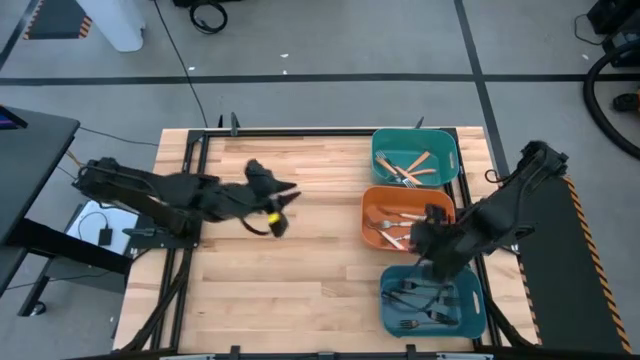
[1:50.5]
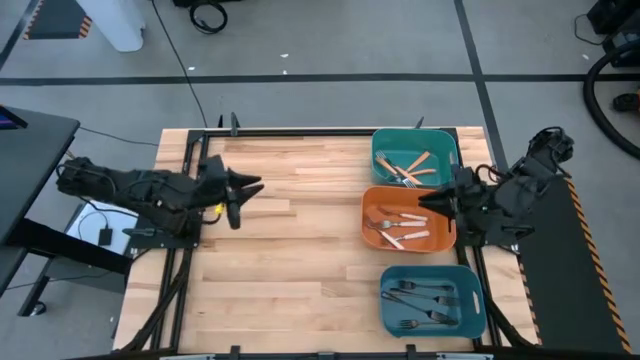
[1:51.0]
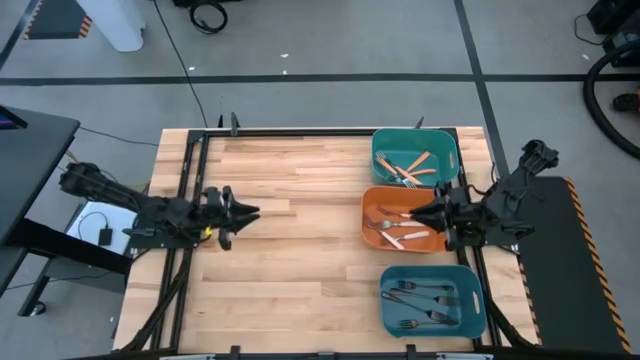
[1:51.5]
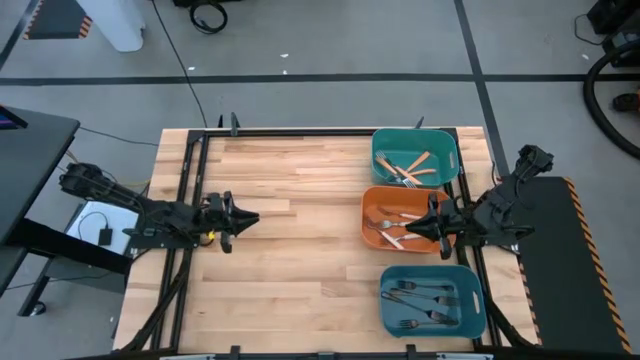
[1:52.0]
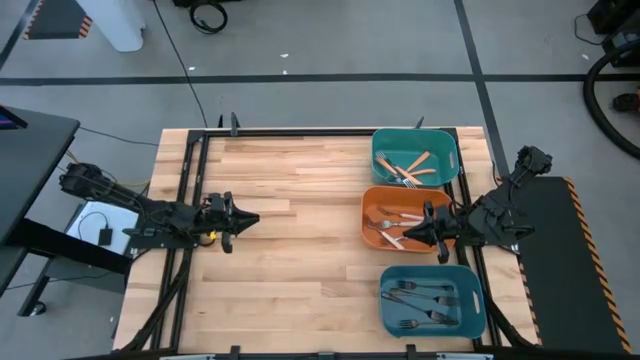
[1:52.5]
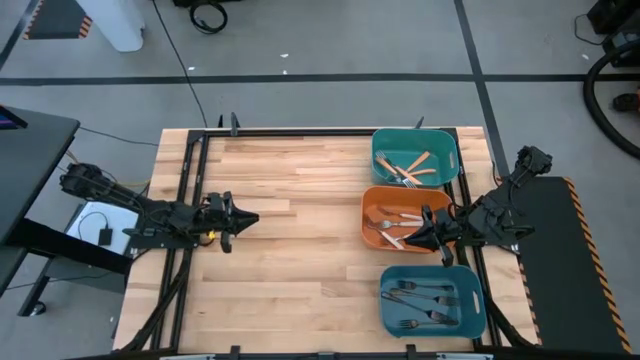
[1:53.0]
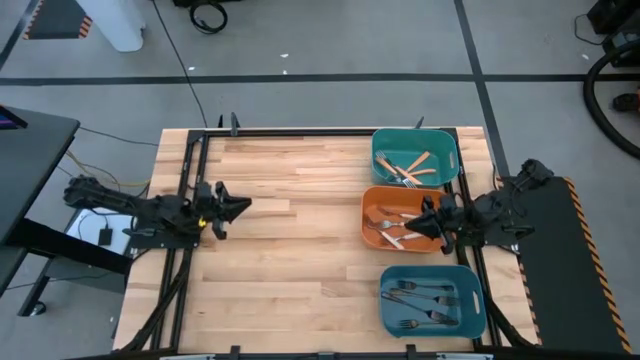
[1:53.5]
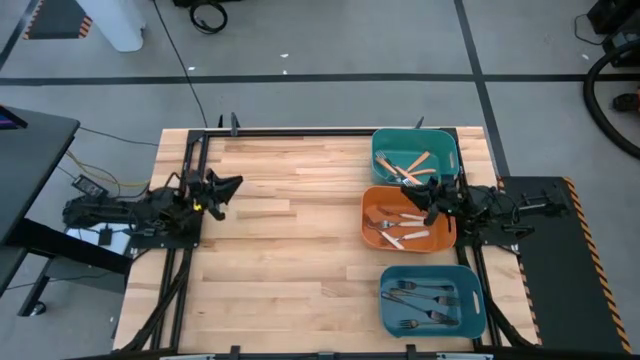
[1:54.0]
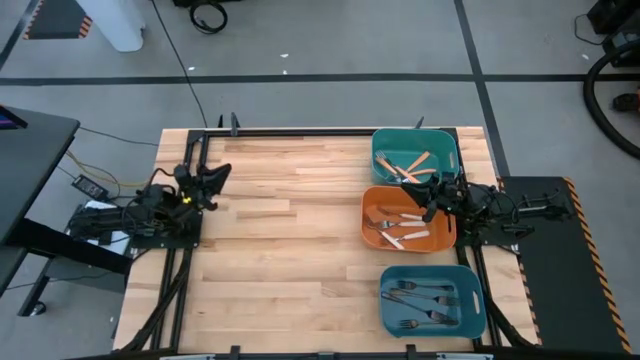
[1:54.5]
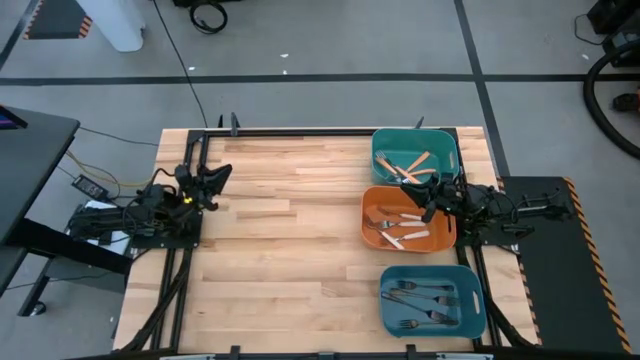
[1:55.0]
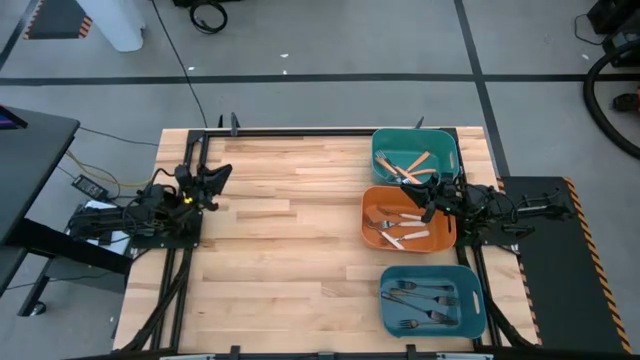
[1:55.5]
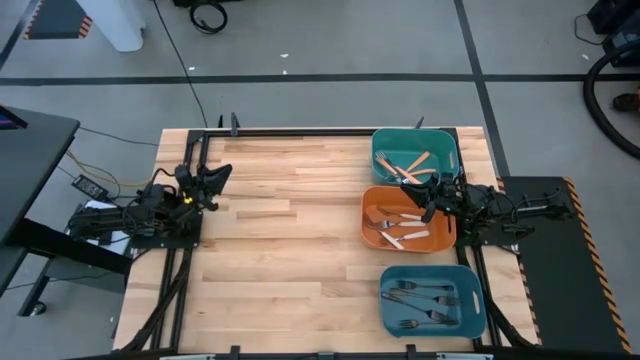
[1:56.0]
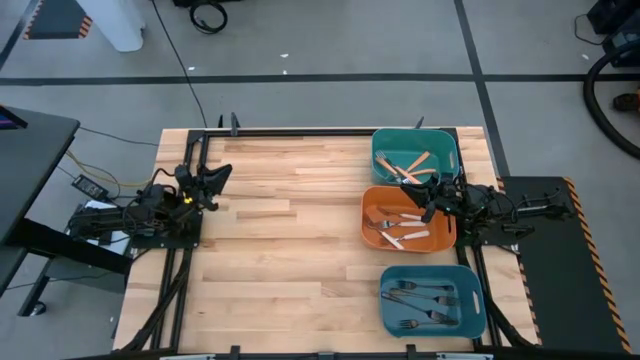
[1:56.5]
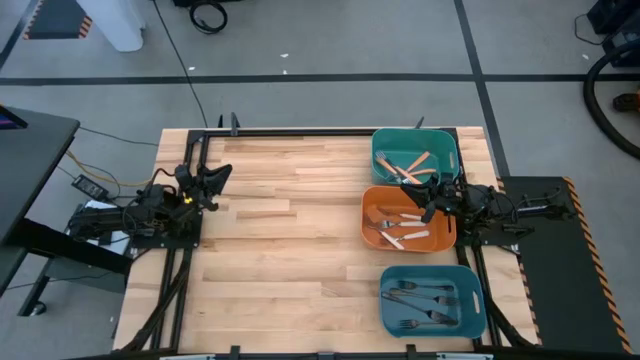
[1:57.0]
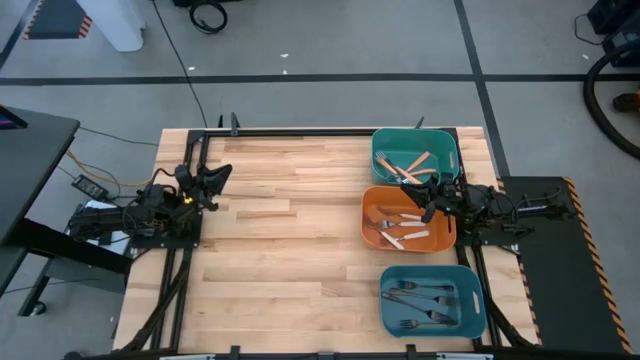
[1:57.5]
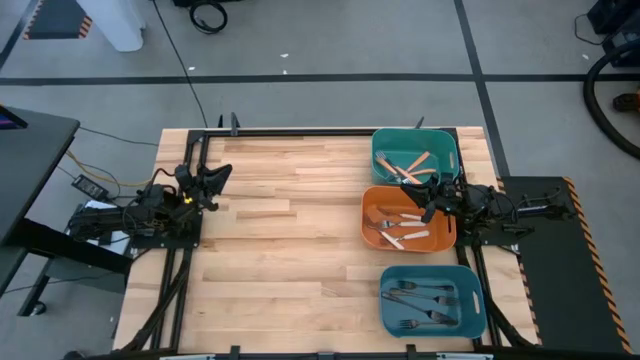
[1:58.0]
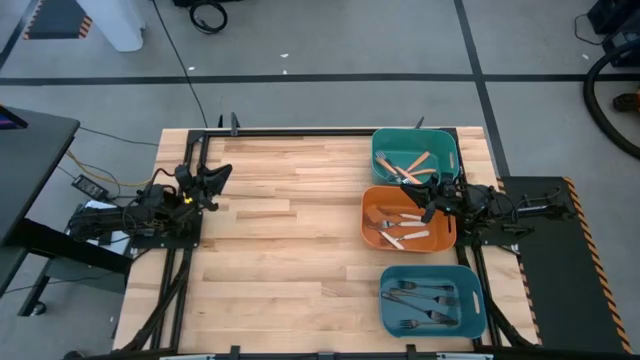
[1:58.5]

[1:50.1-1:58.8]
Task: Sort silverware by color (type)
Return to Home Position

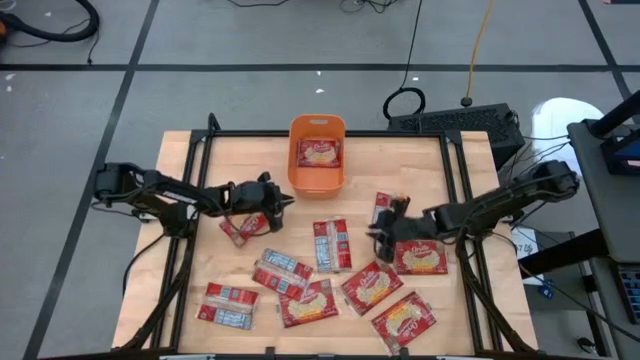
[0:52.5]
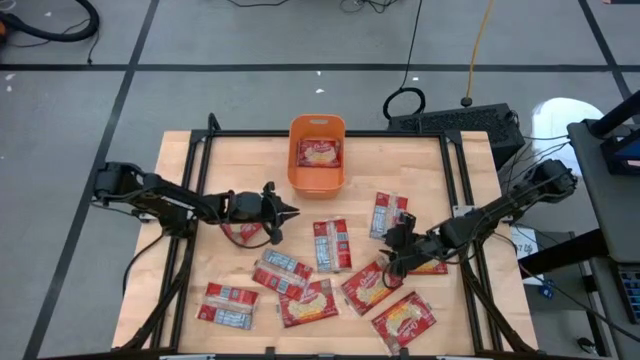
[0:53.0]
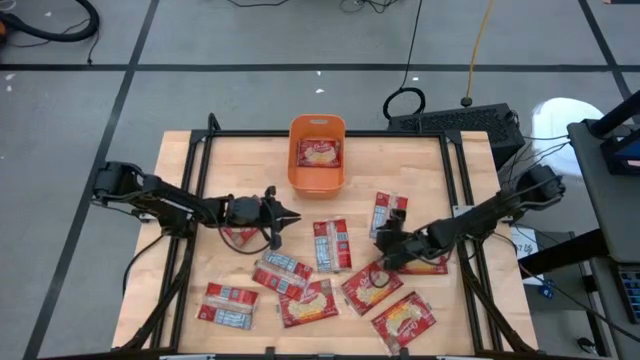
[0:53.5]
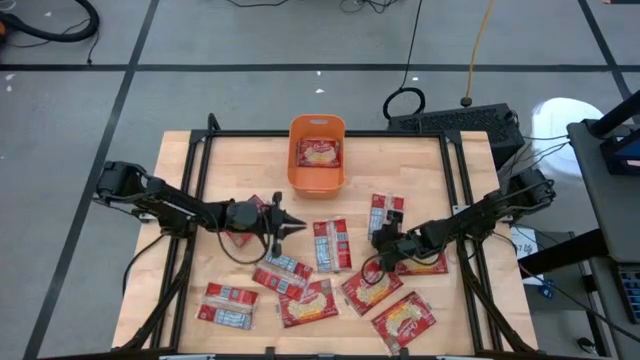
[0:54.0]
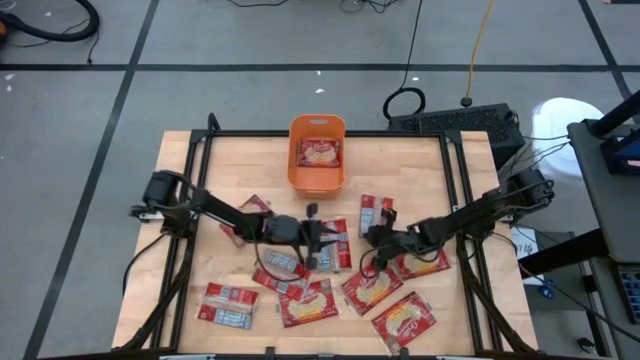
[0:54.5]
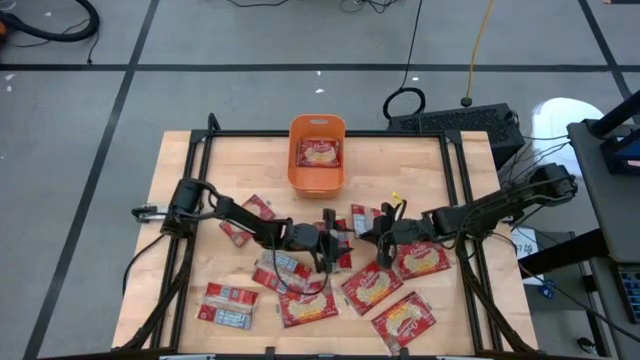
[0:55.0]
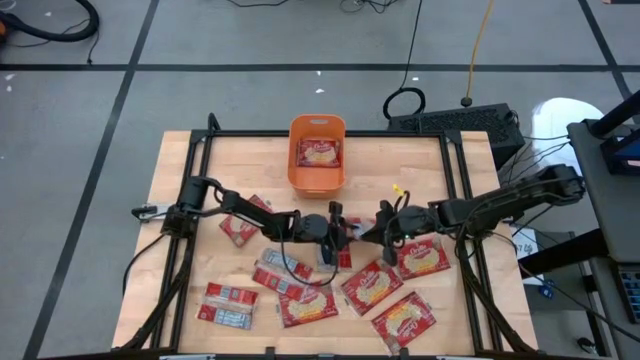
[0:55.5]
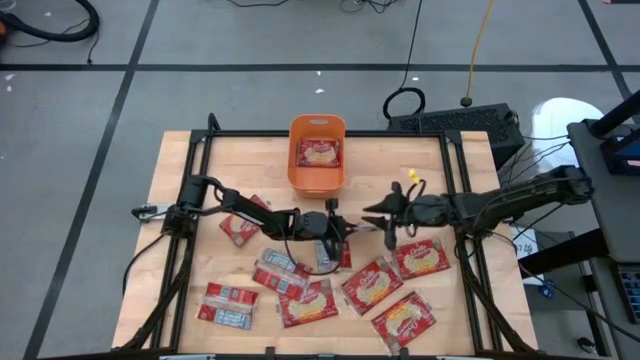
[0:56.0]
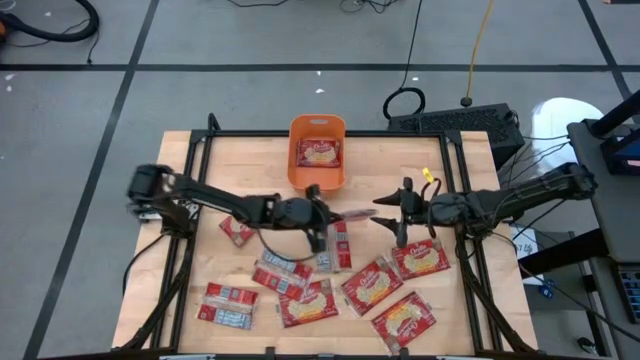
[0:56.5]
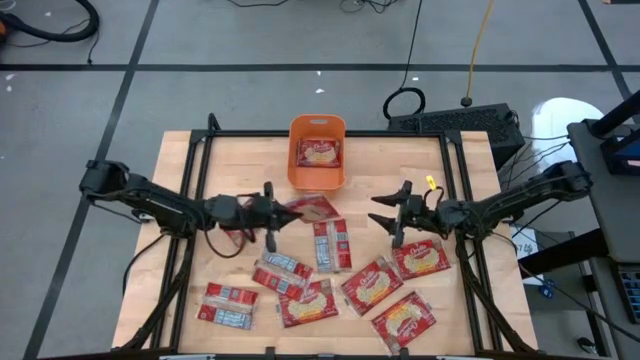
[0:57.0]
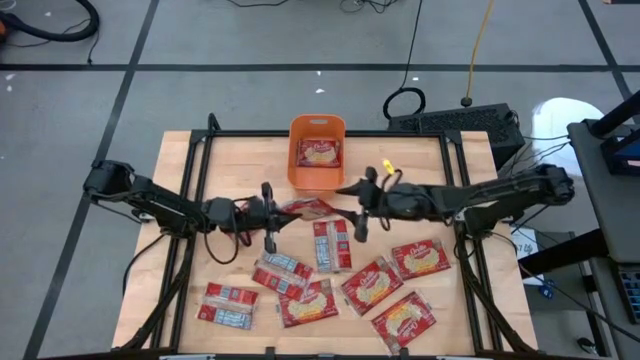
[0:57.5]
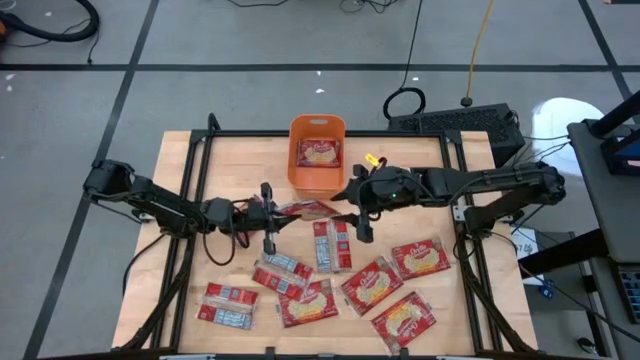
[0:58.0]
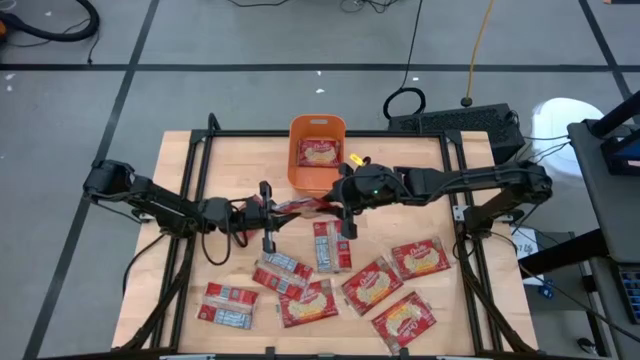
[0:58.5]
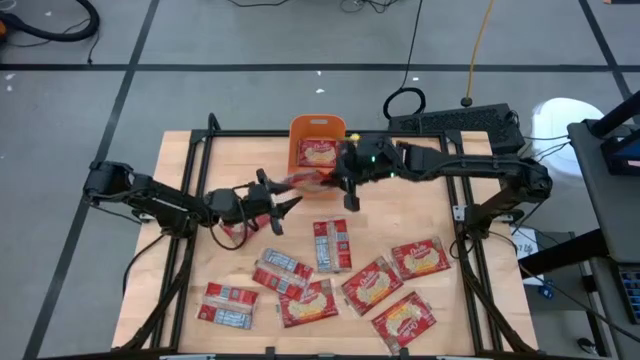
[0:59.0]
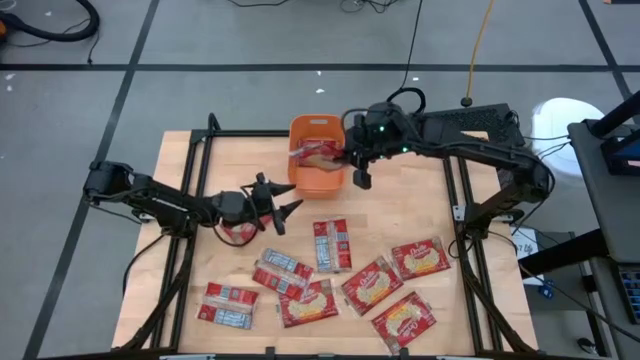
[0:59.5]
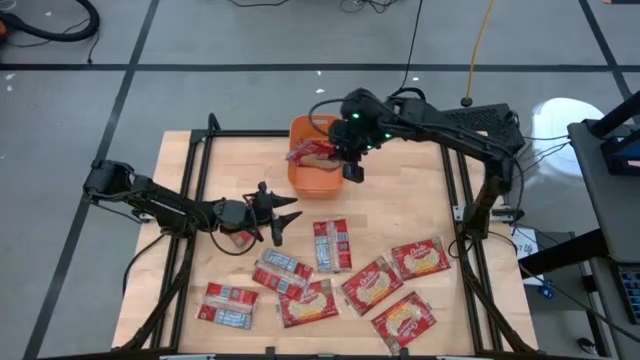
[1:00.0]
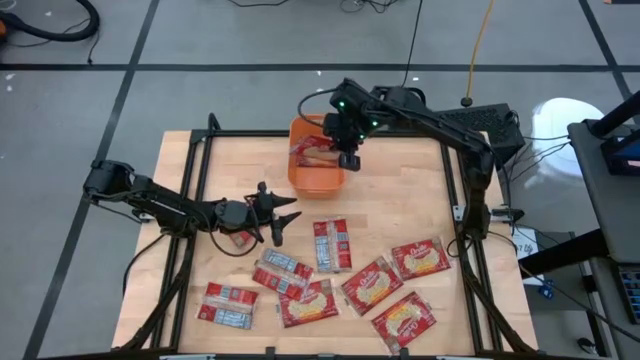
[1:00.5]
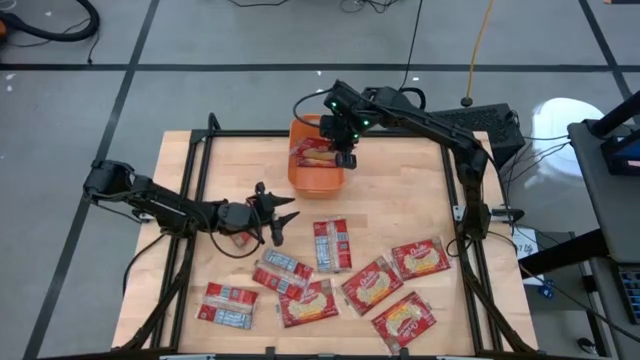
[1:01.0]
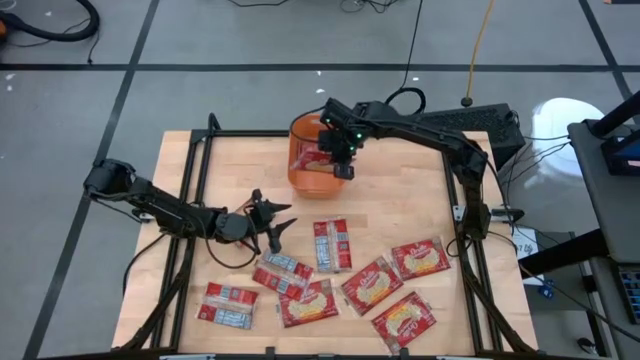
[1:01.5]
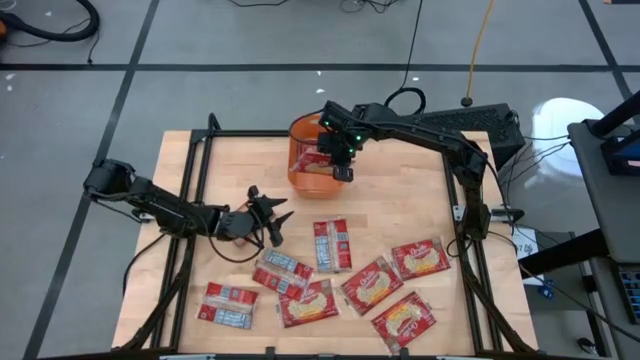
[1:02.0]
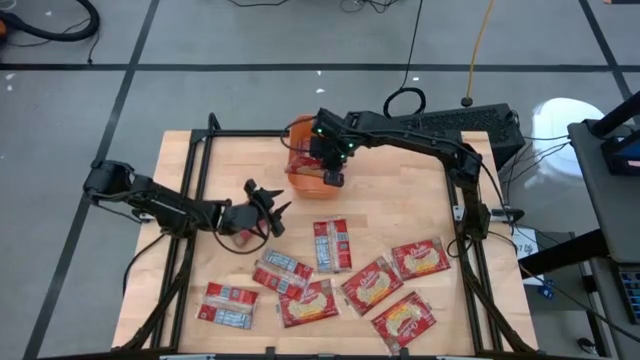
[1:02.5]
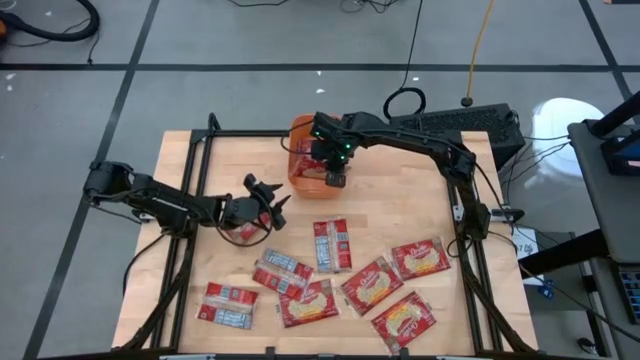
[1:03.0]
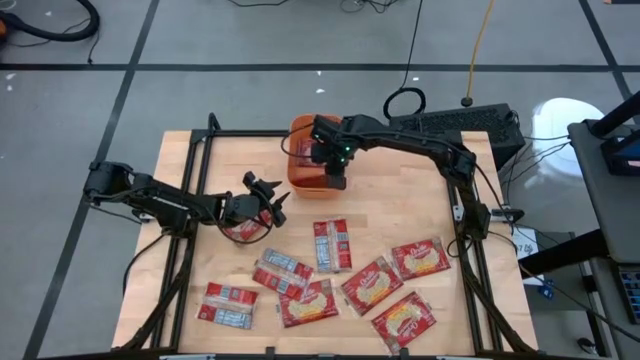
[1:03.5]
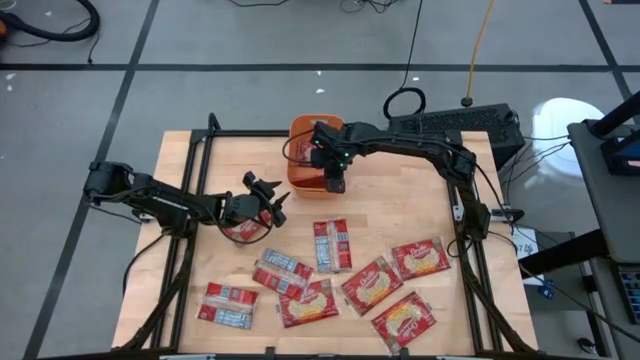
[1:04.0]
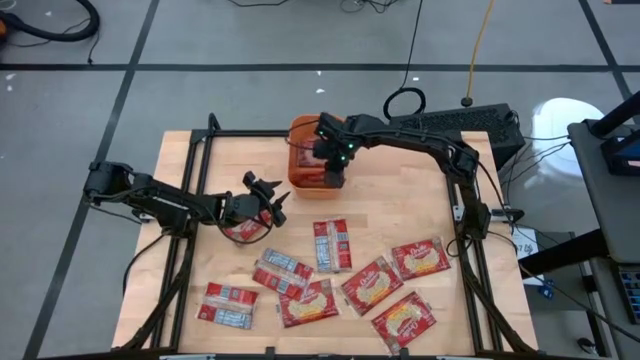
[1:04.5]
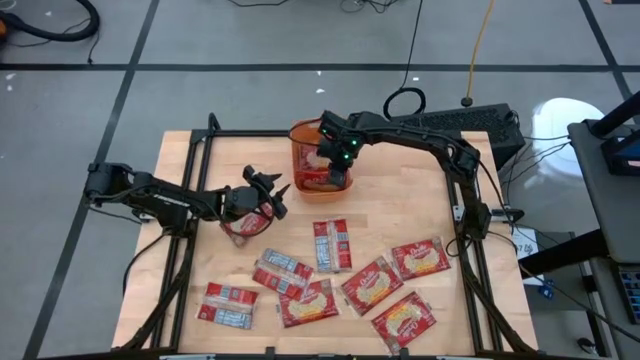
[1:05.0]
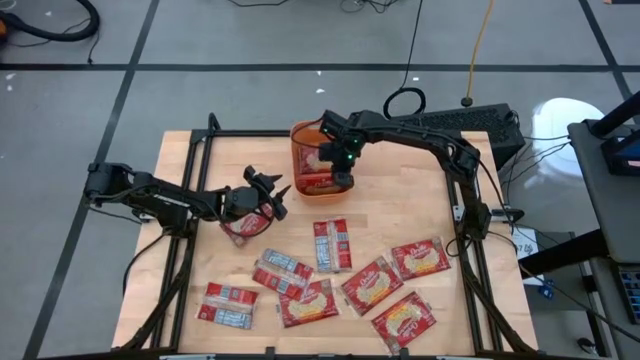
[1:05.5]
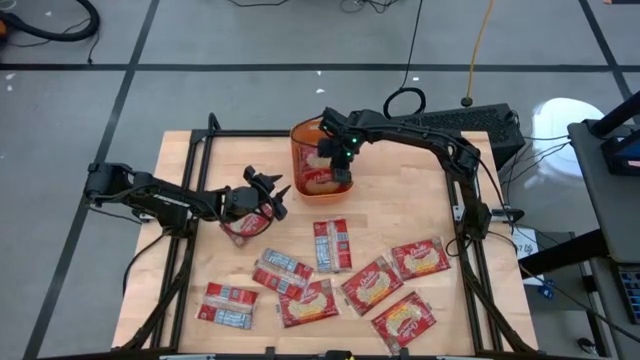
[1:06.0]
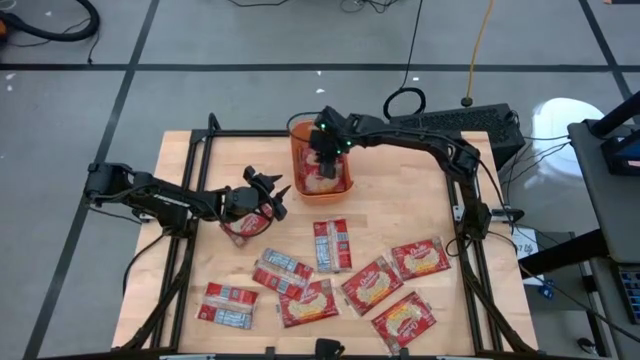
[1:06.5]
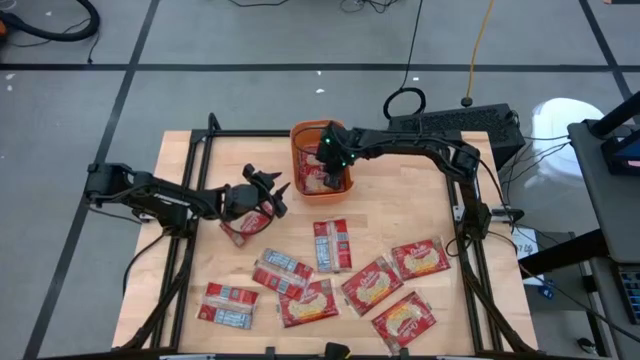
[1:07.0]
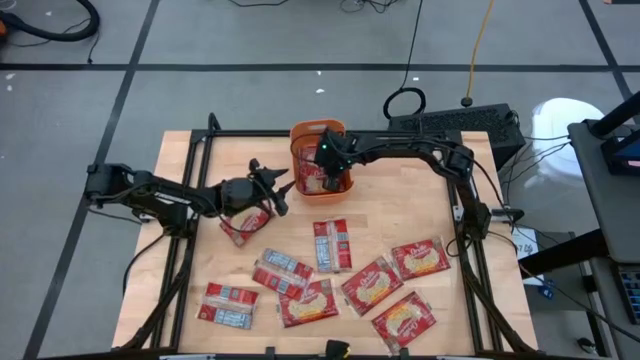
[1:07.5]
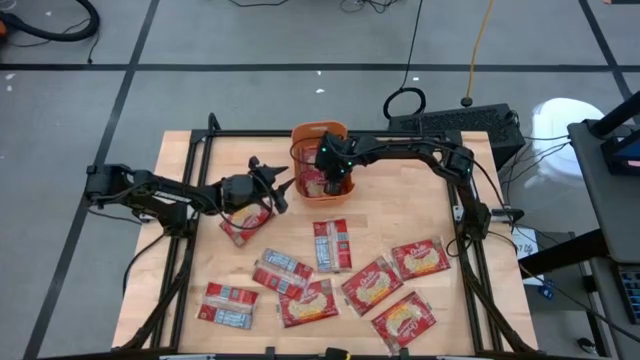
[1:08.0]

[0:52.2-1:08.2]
Task: Sort popcorn bags into baskets
Put the red popcorn bag into the orange bin
